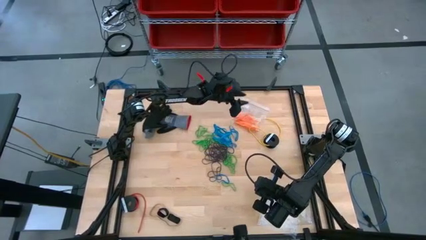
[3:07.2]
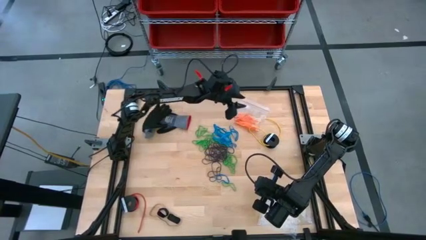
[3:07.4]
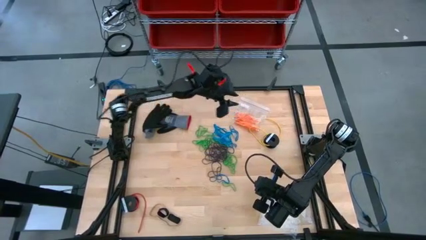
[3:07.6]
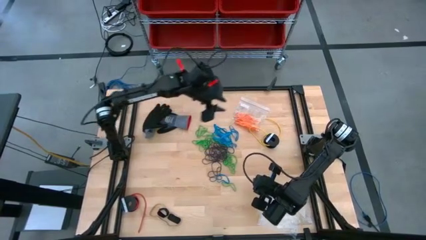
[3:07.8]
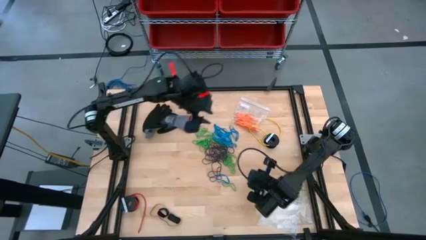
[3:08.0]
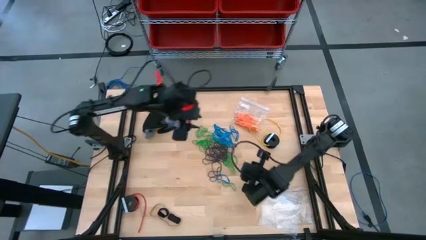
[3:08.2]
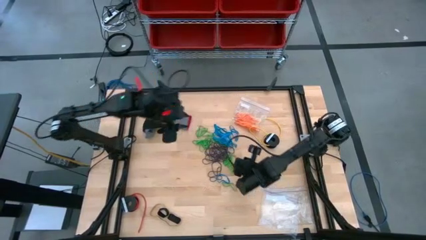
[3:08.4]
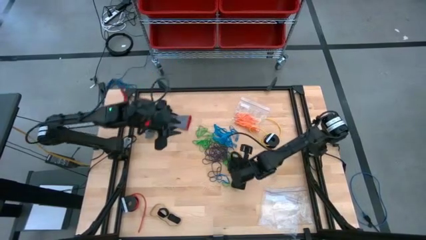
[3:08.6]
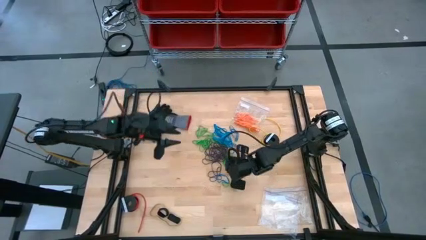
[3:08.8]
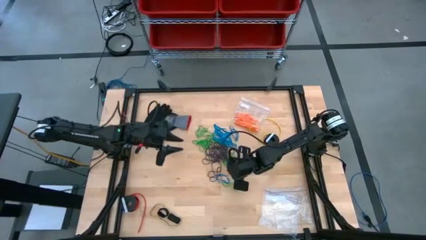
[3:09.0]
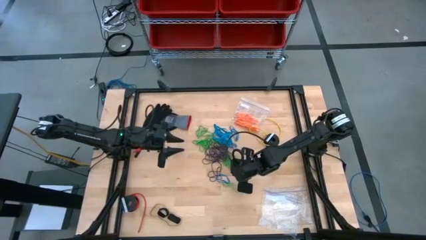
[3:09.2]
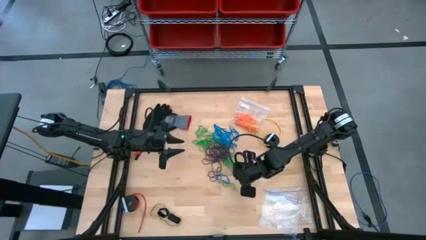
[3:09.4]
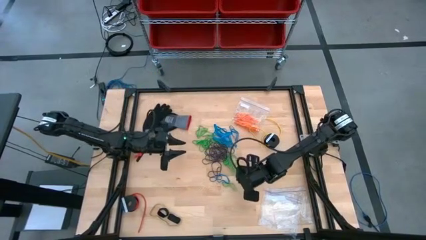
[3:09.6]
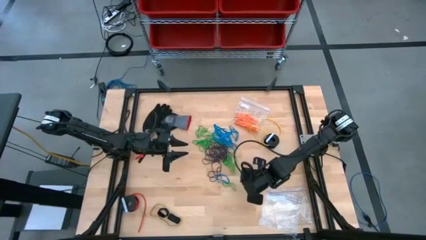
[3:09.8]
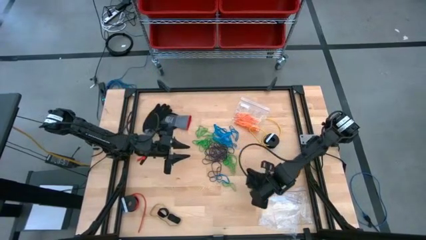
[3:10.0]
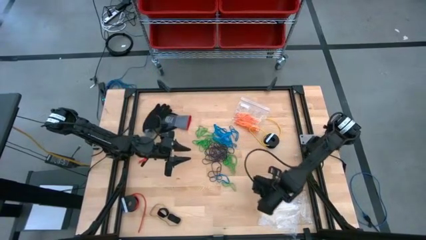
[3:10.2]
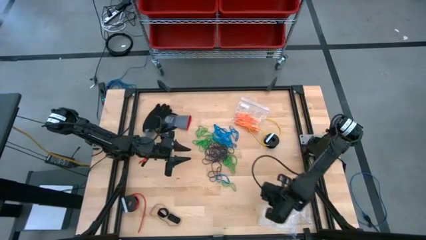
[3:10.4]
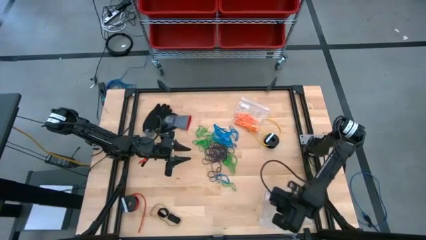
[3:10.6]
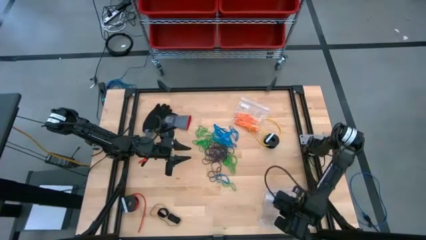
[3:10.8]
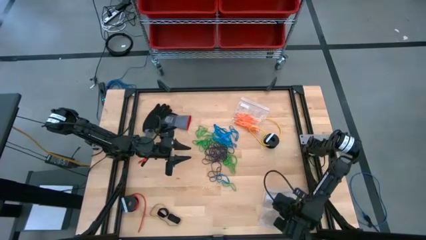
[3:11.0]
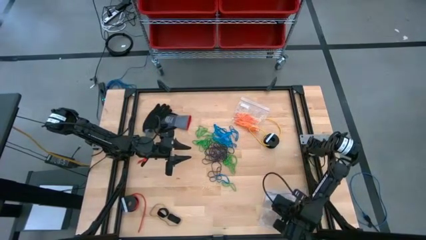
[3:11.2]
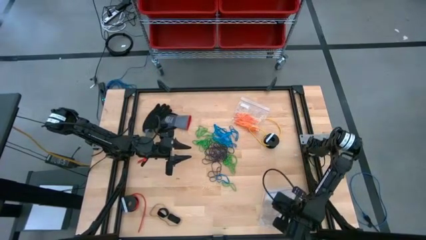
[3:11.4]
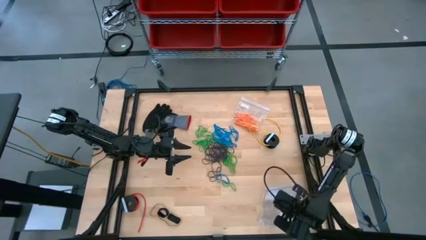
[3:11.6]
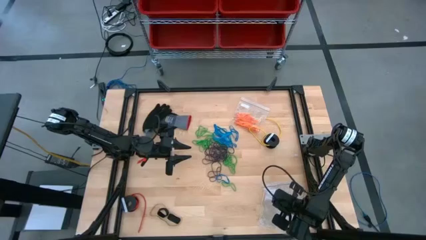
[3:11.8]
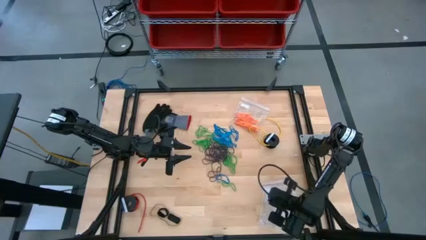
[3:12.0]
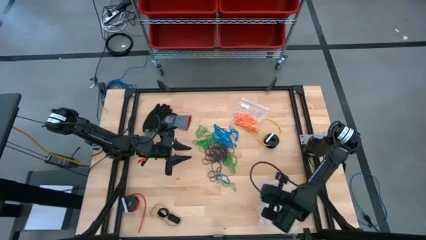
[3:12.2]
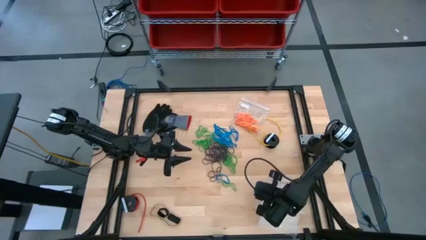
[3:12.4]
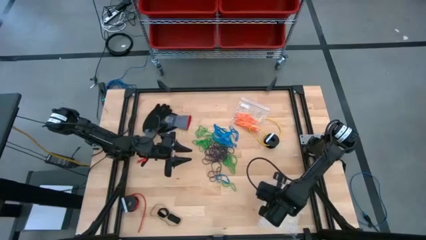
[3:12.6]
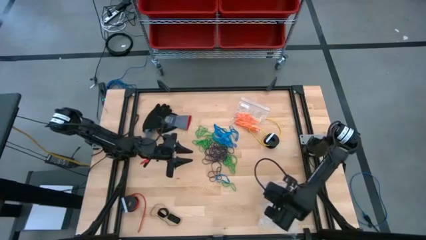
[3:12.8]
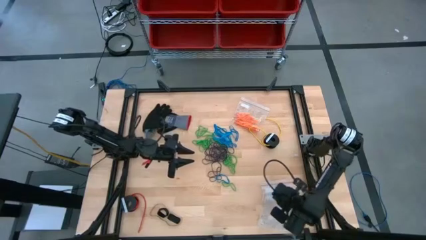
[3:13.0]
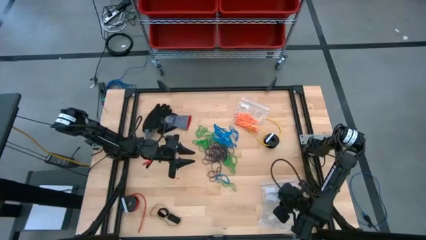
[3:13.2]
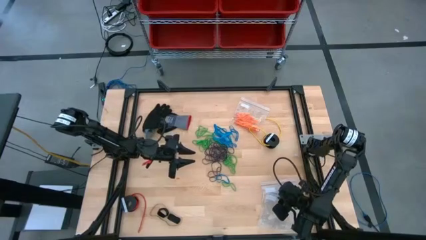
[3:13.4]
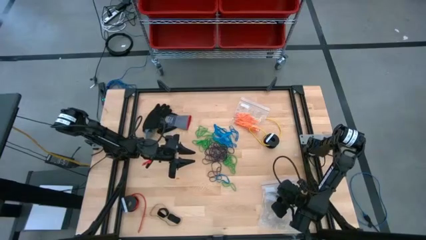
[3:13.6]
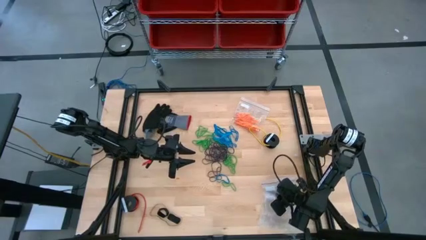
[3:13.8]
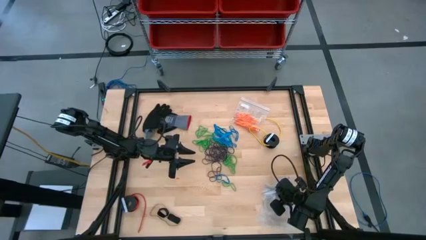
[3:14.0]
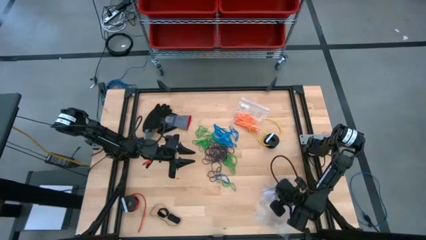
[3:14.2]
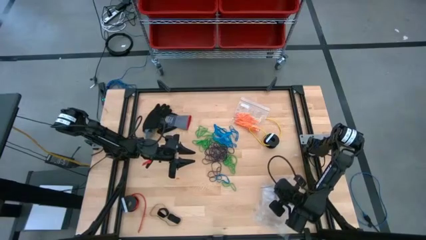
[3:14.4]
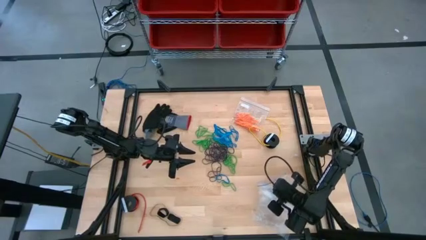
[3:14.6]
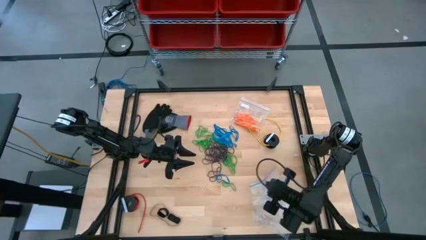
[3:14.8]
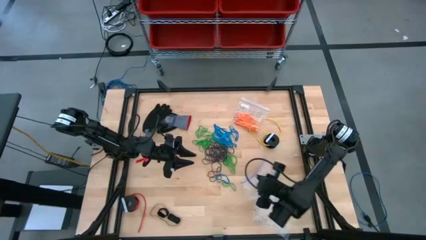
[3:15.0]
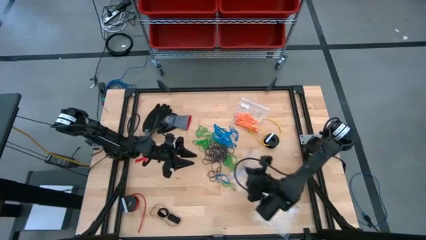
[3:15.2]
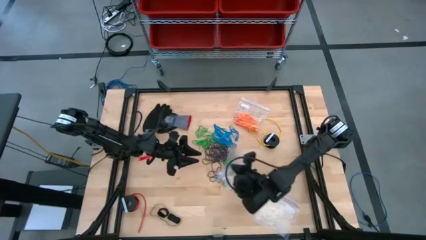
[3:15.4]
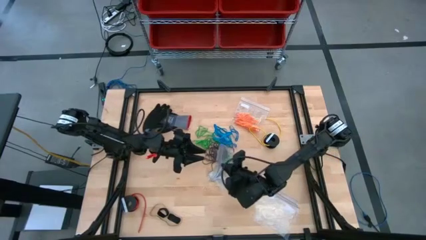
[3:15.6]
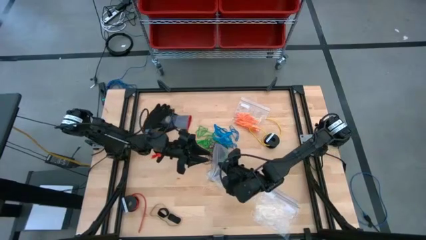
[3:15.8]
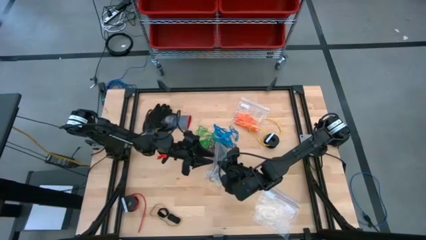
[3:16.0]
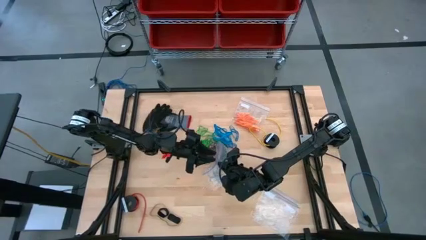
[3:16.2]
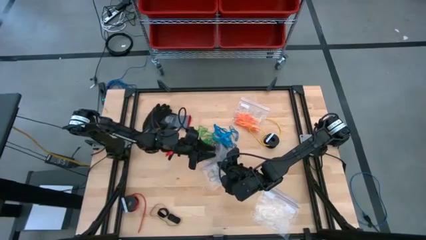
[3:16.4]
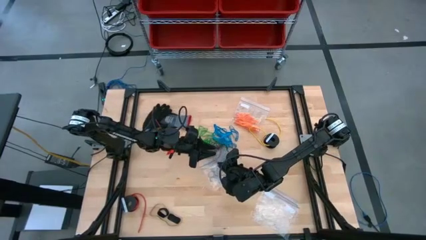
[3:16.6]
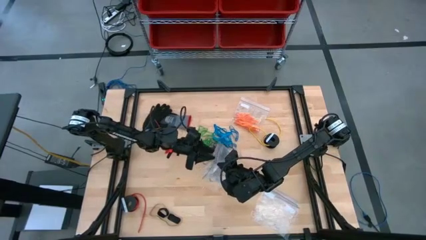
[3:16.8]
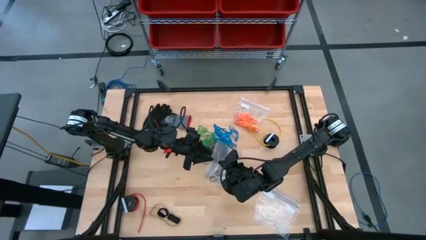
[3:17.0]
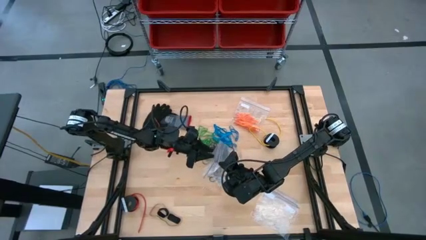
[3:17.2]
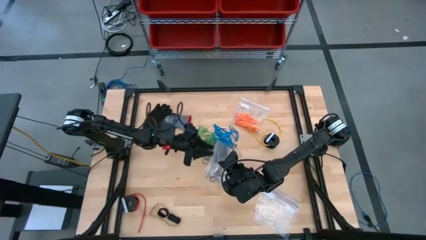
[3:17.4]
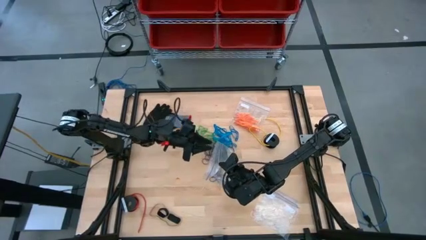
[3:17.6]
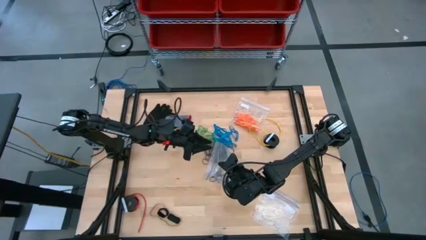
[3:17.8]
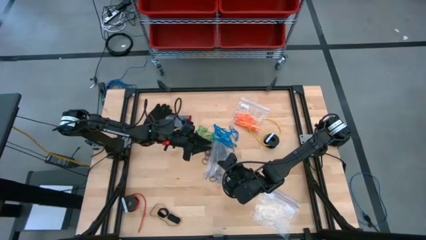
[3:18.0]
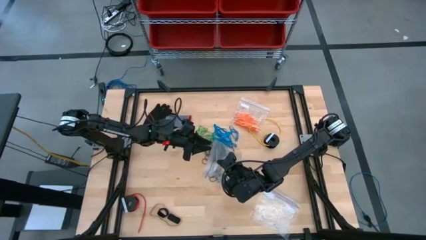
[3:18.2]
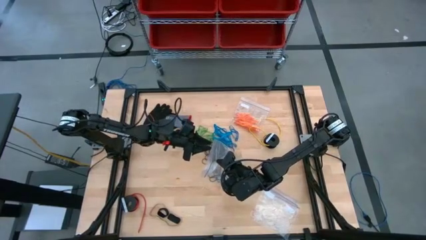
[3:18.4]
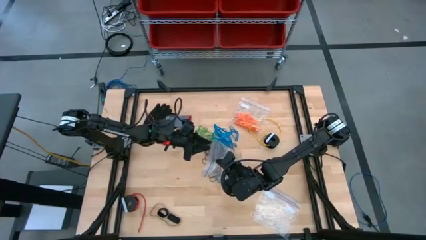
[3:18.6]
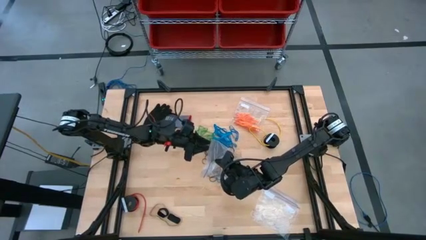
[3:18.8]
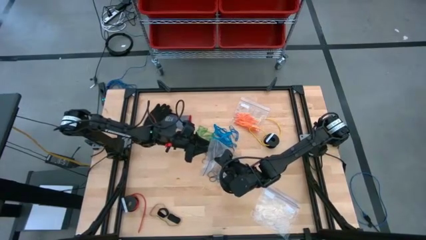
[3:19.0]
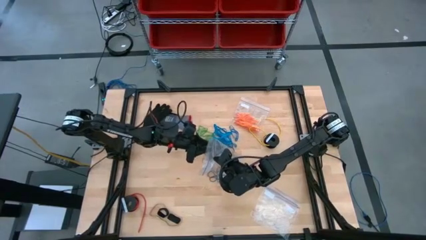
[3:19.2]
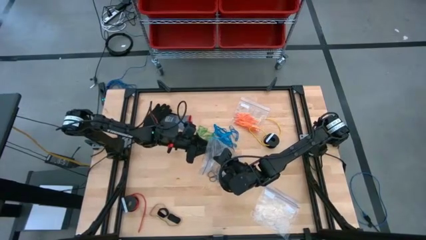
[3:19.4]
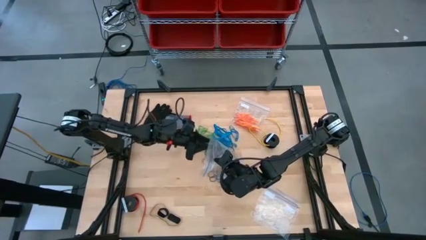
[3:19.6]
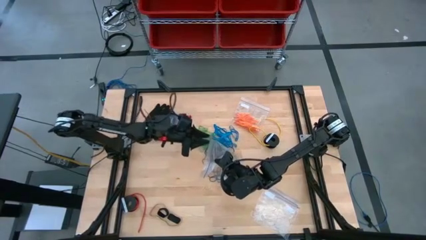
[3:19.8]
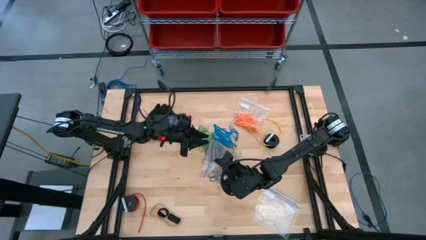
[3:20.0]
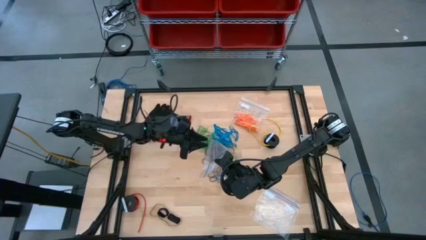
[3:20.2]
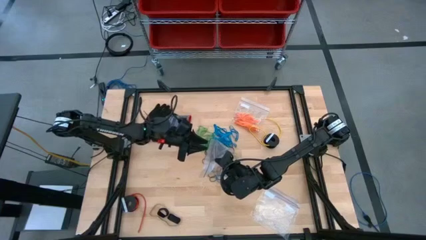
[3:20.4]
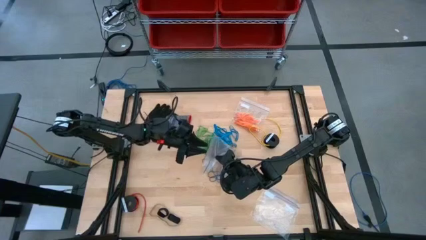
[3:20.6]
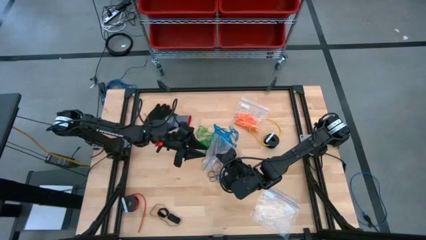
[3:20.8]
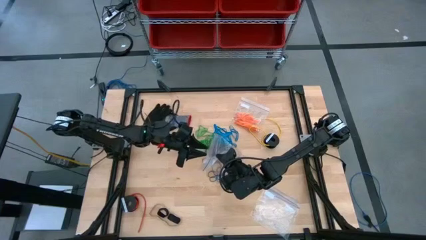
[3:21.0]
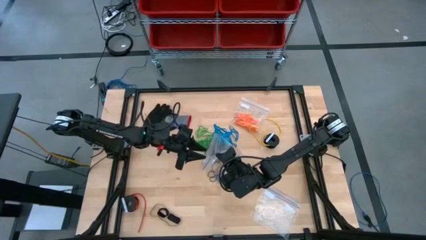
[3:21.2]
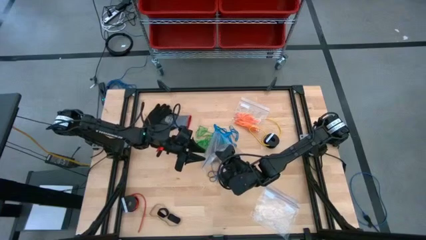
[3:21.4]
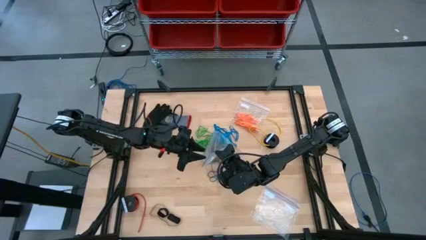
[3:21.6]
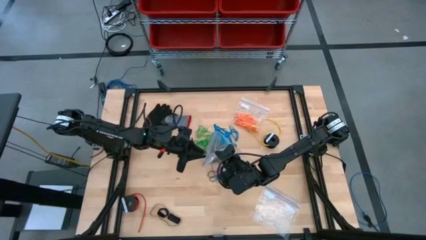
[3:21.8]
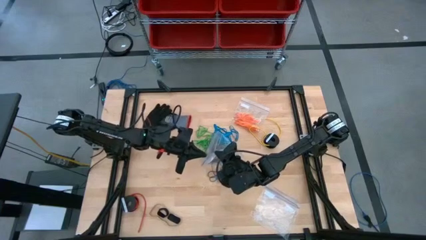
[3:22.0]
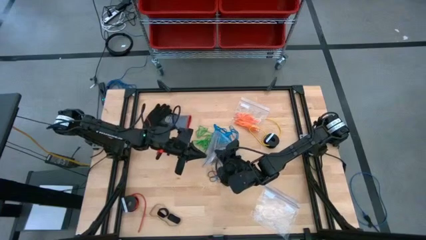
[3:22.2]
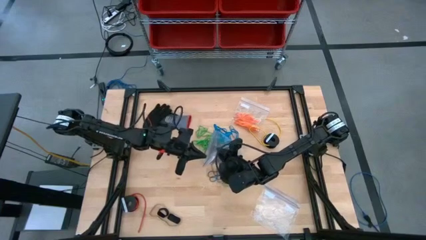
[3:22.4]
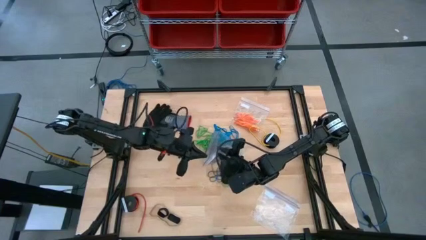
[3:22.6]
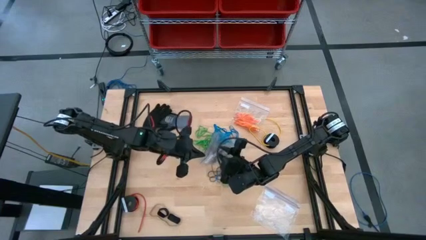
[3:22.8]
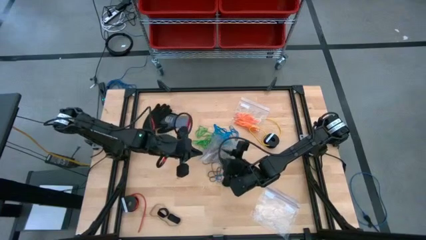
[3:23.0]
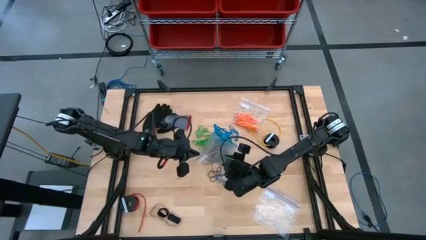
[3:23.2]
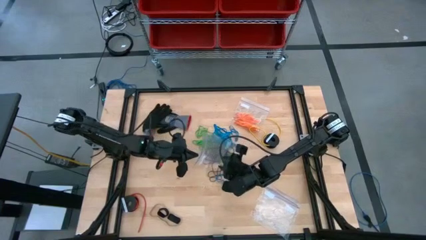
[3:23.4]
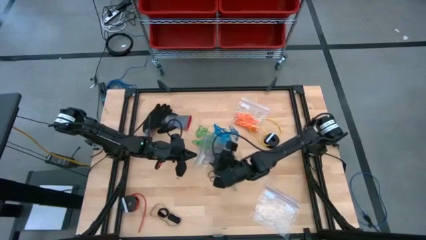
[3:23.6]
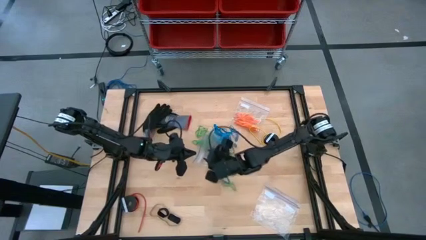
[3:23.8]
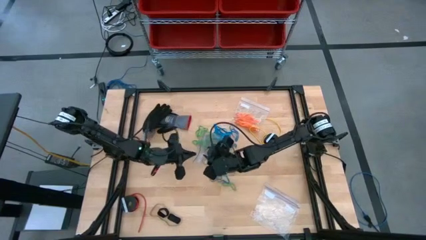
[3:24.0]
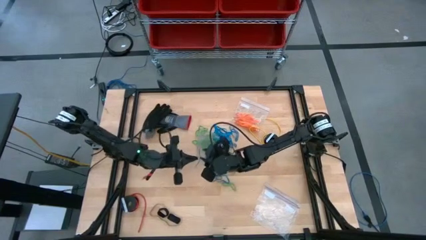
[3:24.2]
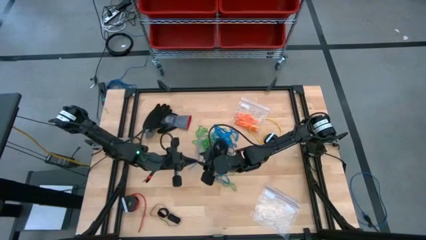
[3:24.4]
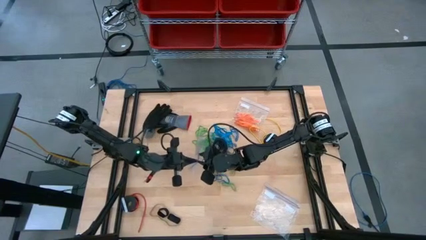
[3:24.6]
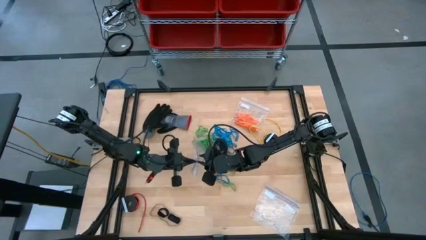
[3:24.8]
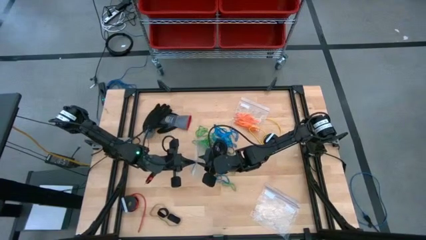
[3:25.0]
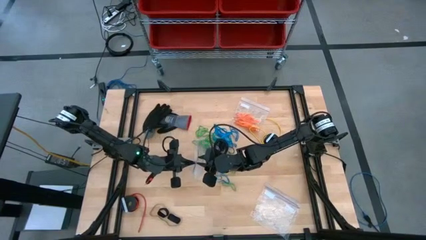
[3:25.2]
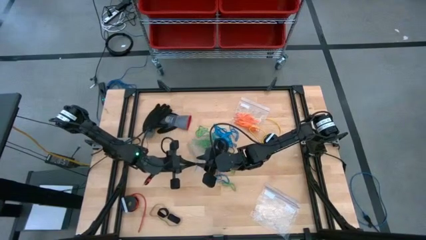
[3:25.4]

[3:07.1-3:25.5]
Task: Sort rubber bands
Open the transparent zip bag
